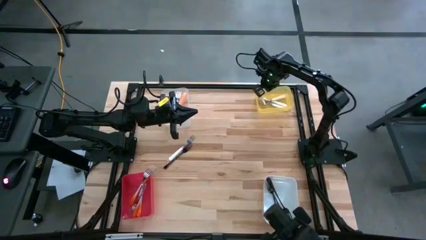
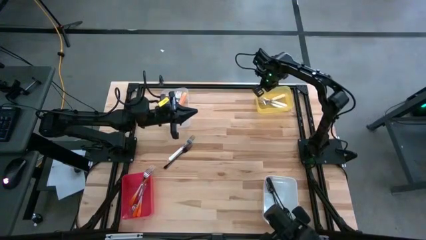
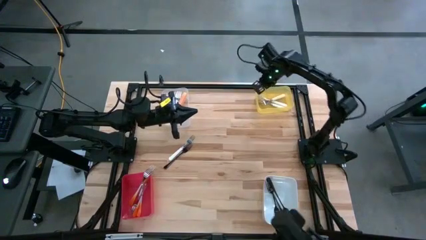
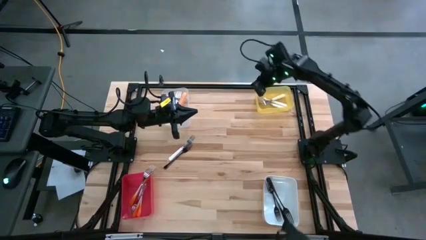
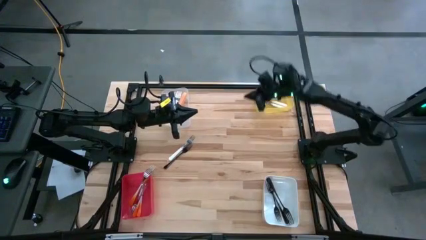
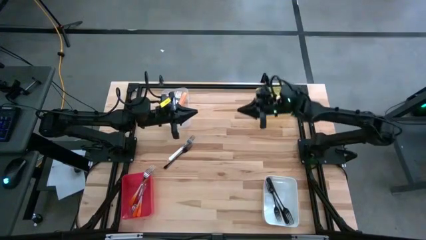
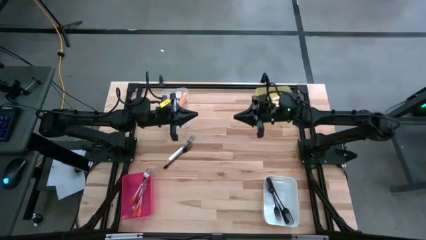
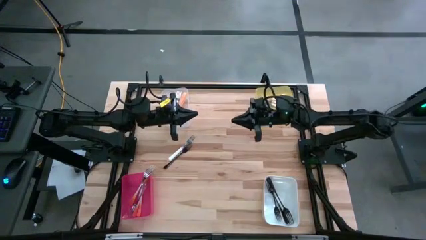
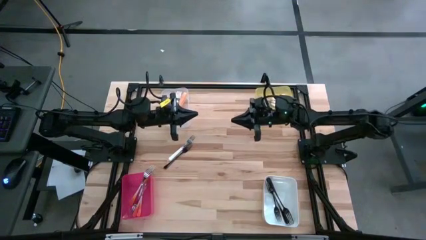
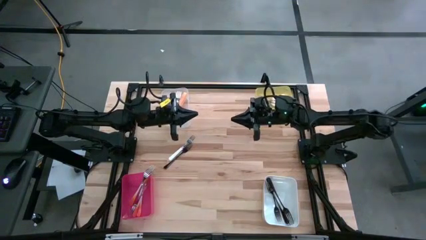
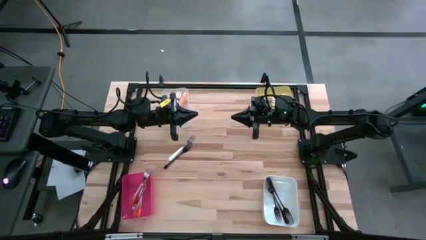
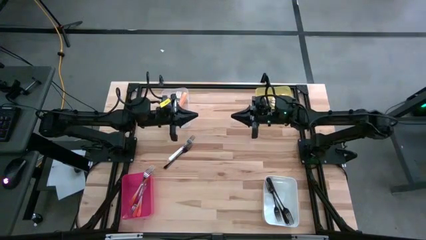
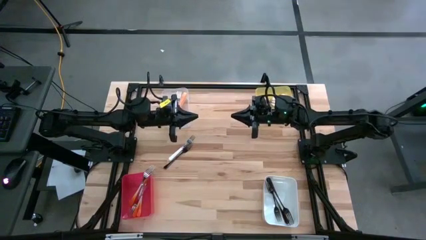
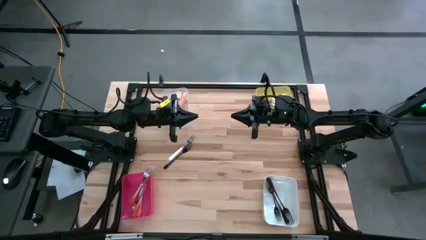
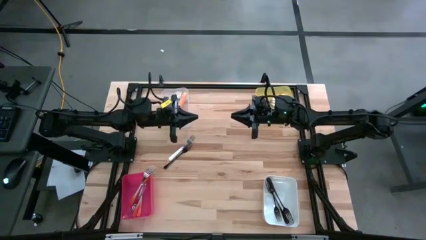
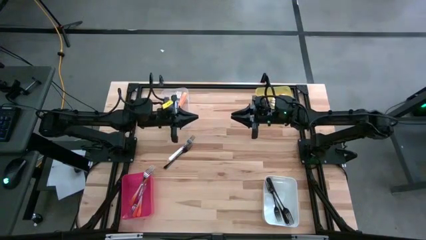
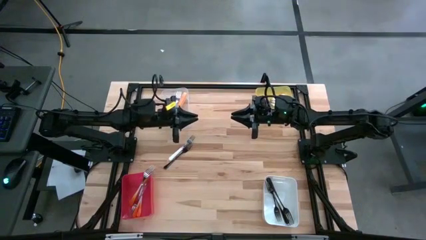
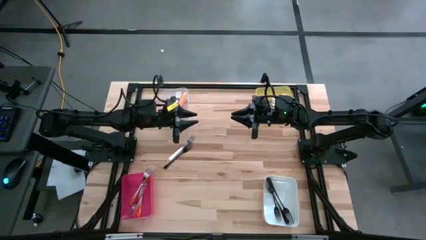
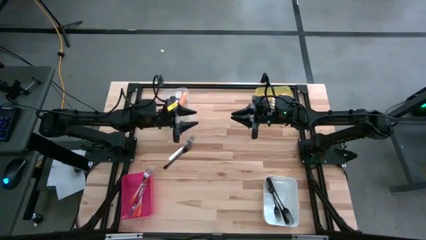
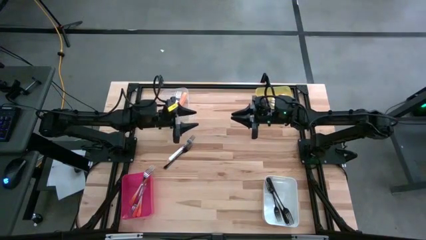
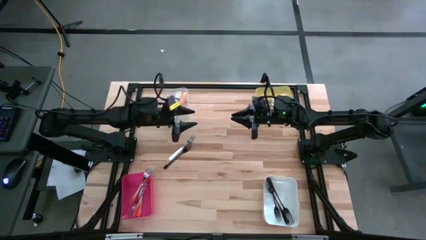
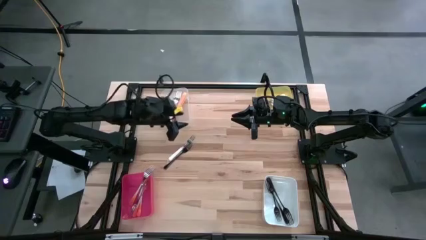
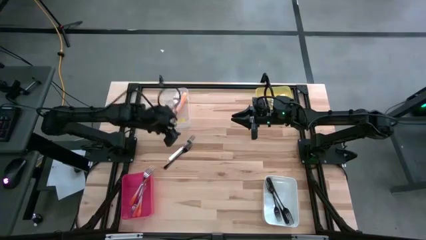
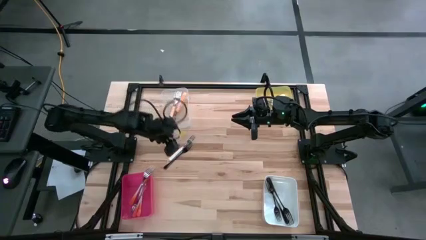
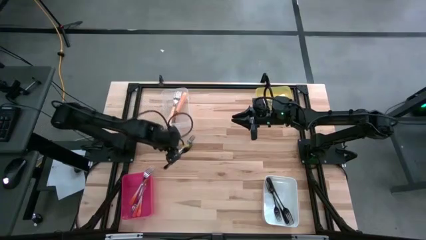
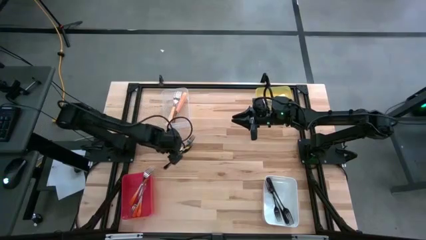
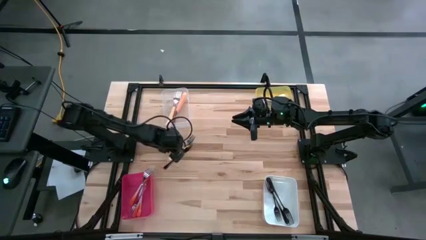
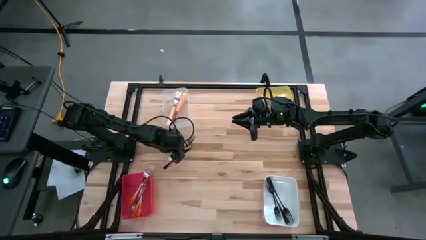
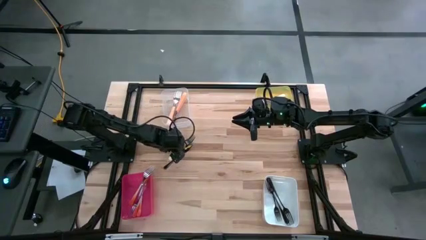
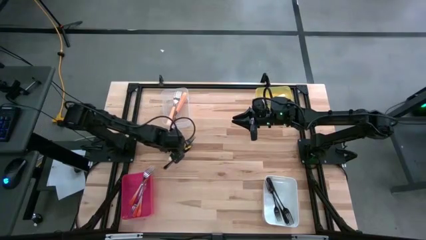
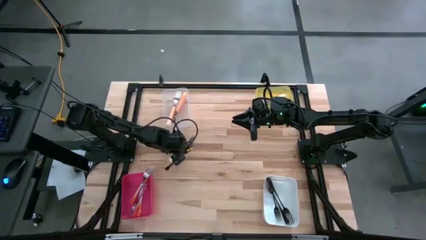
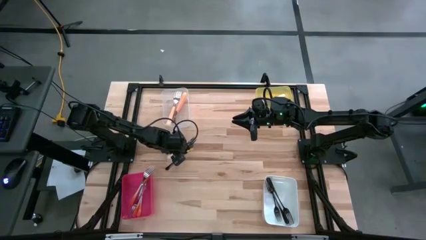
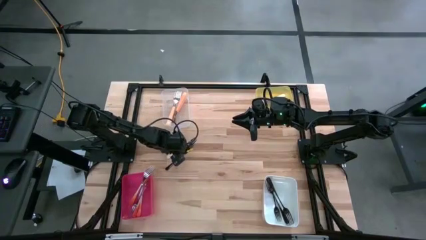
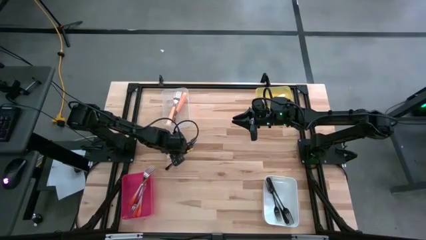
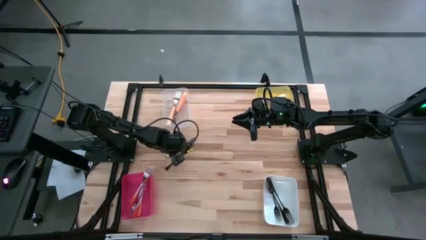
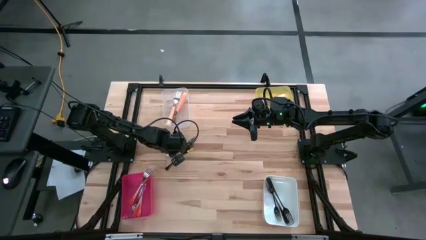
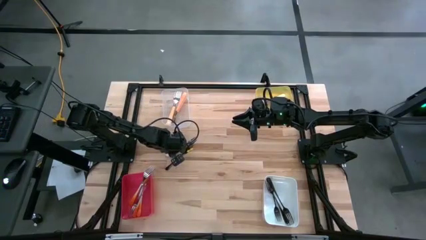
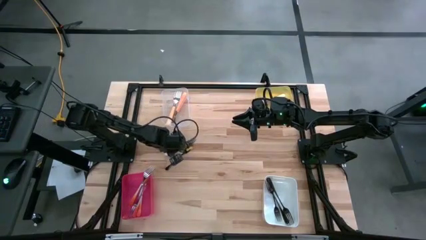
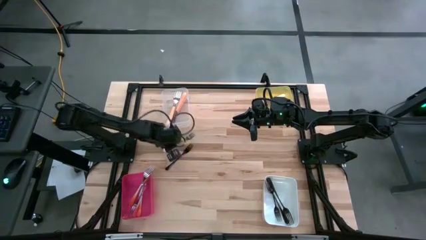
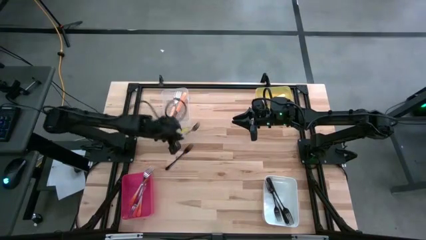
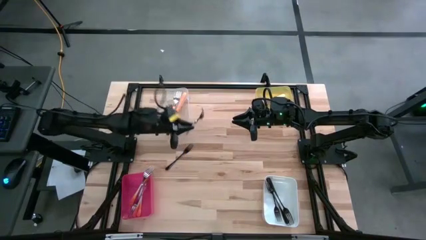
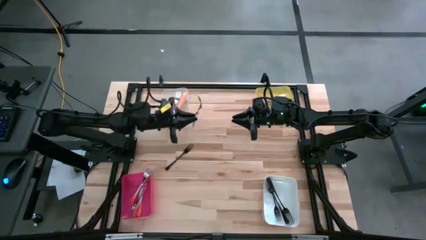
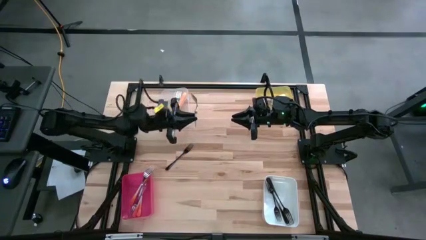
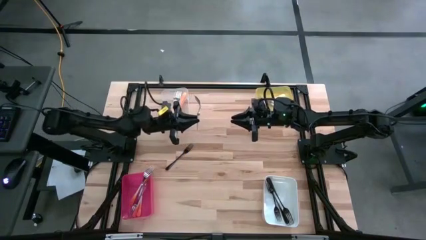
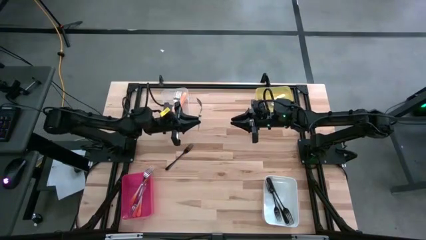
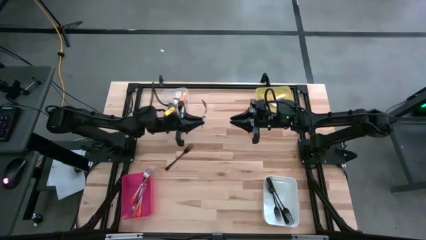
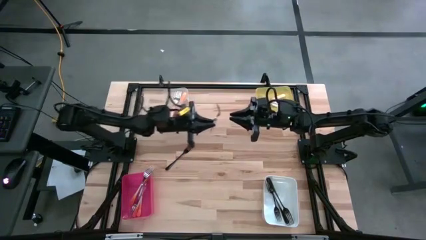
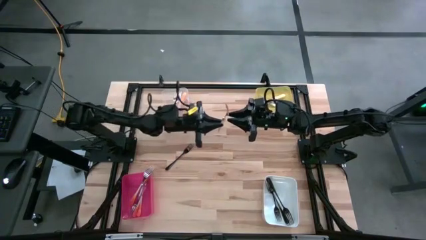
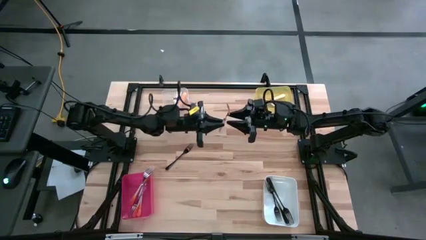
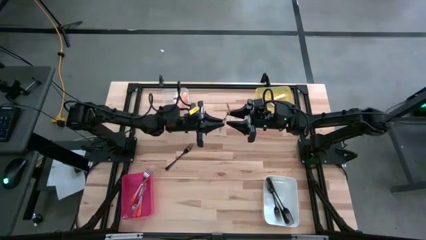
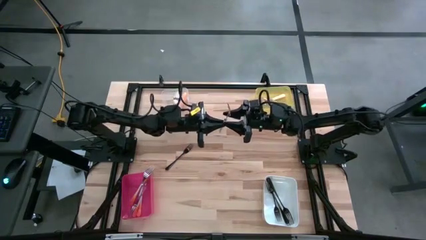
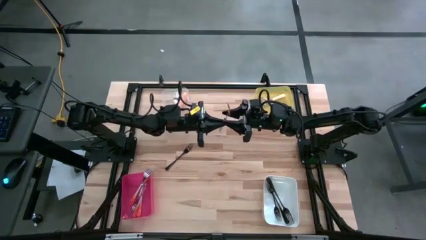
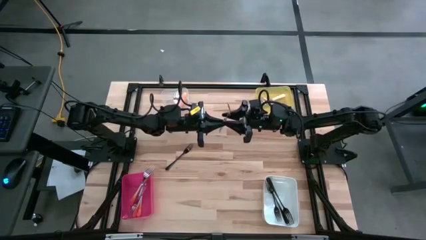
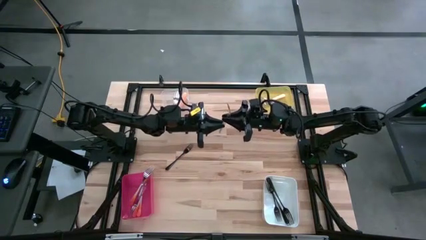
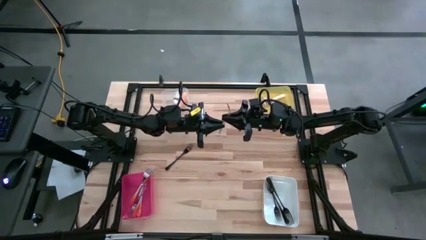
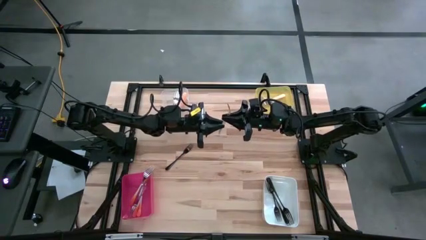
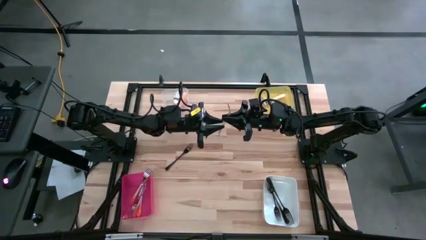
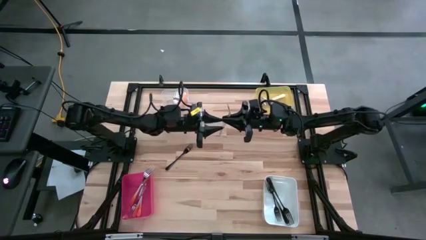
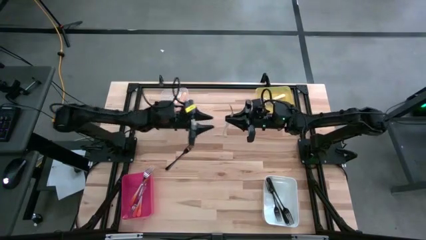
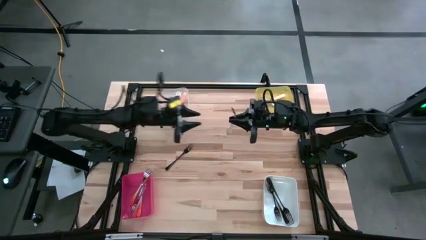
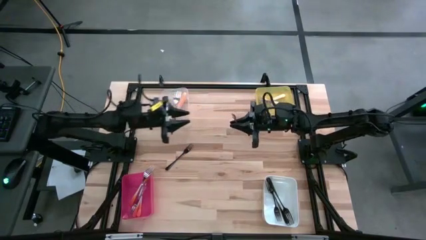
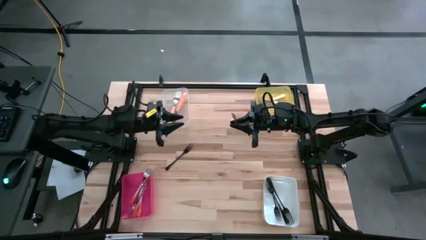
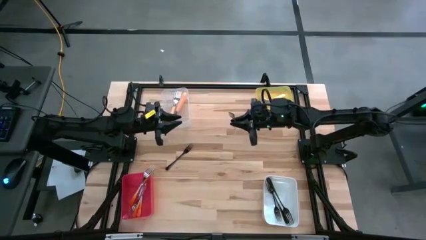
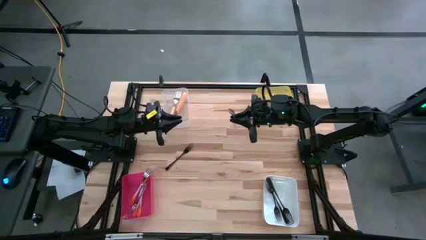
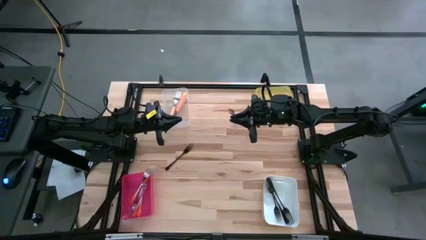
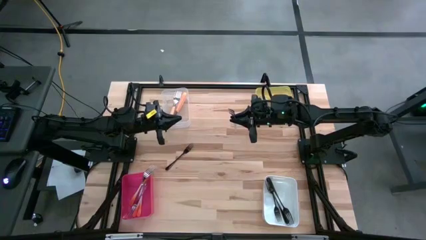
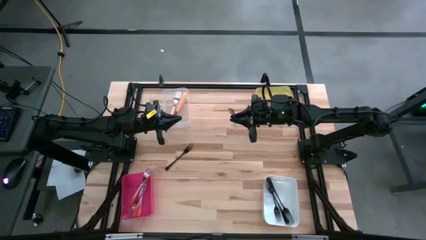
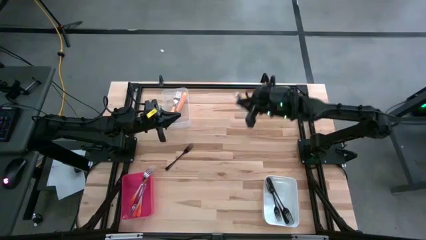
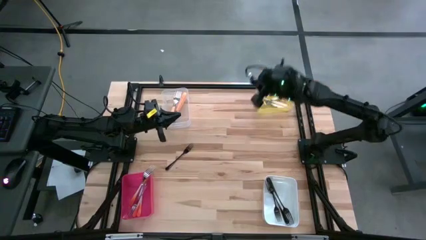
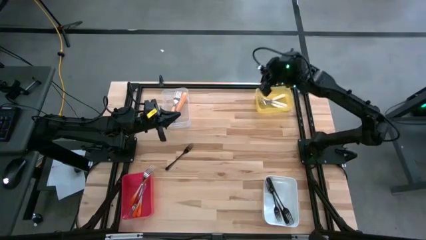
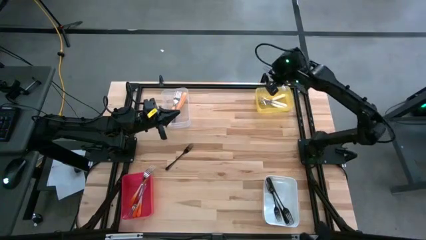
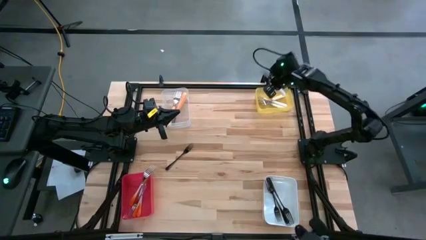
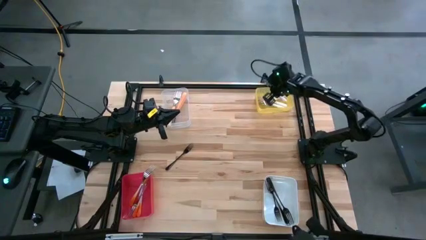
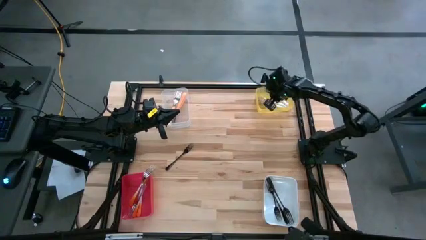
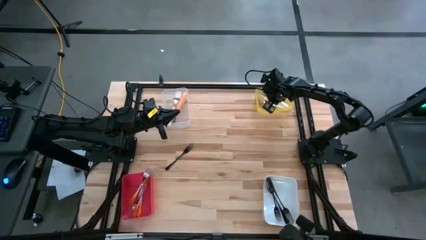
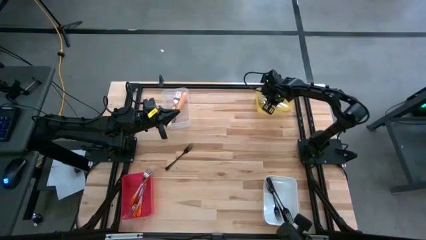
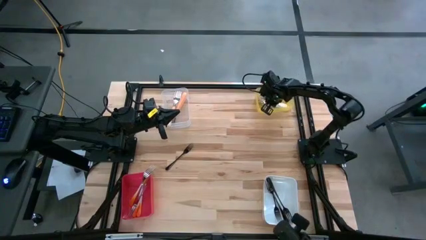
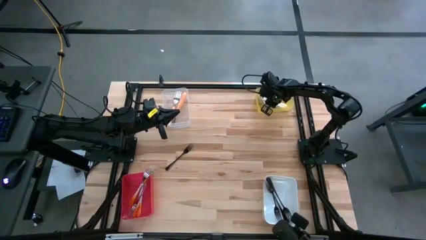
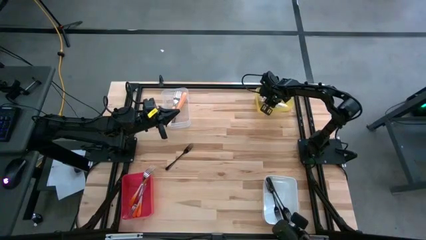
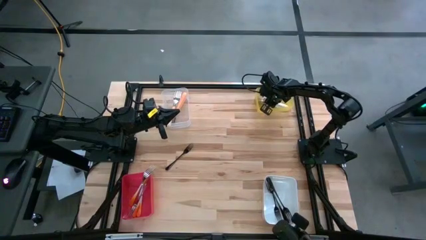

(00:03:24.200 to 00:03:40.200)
Task: Sort silverware by color (type)
Put the white fork into the yellow bin
